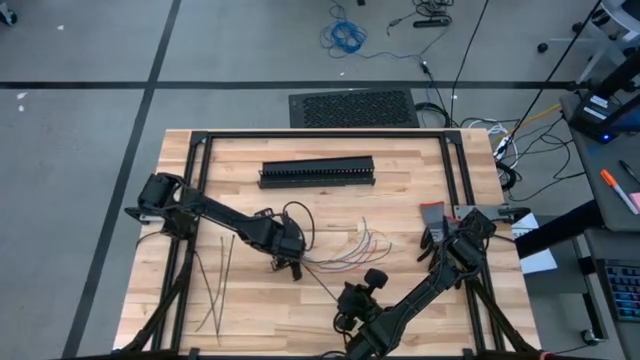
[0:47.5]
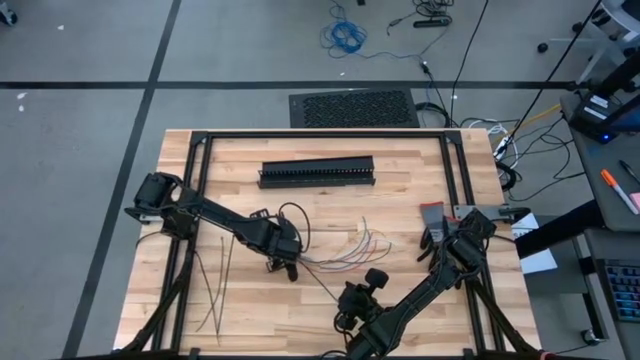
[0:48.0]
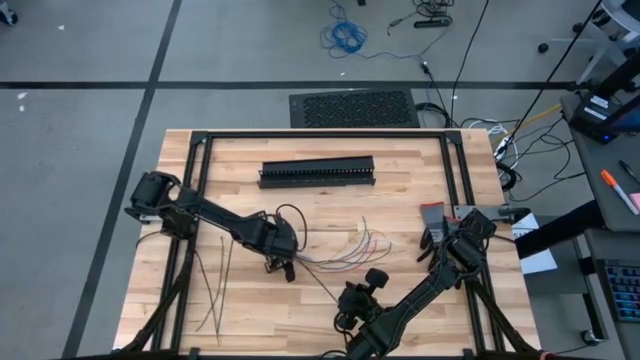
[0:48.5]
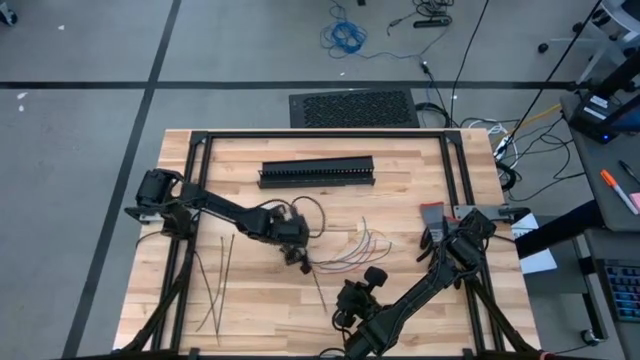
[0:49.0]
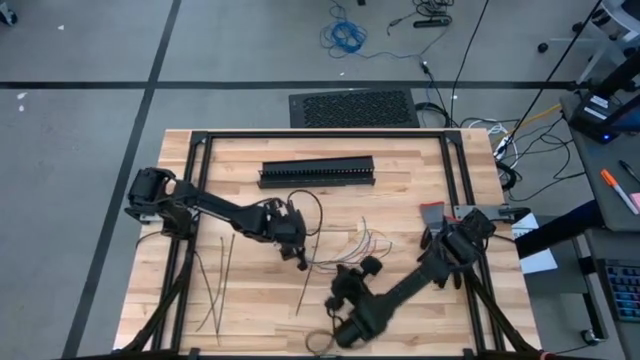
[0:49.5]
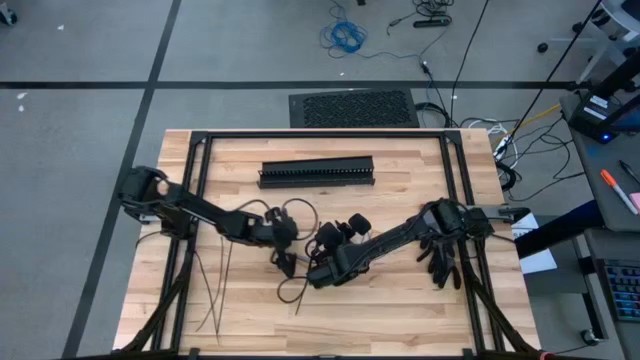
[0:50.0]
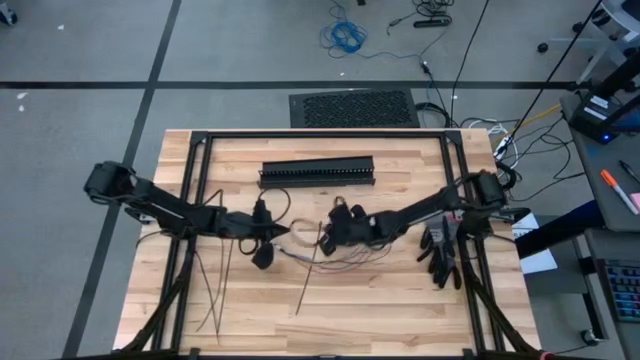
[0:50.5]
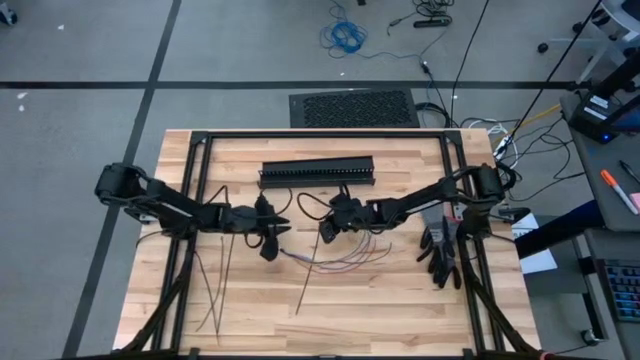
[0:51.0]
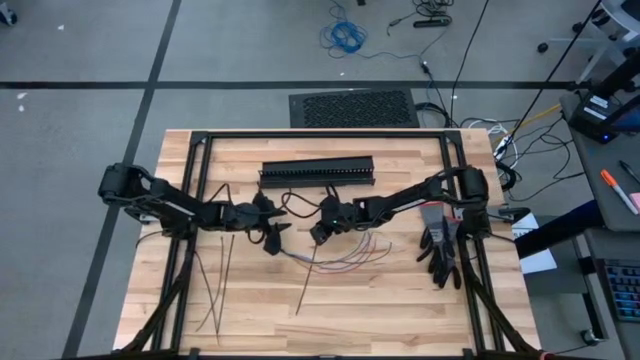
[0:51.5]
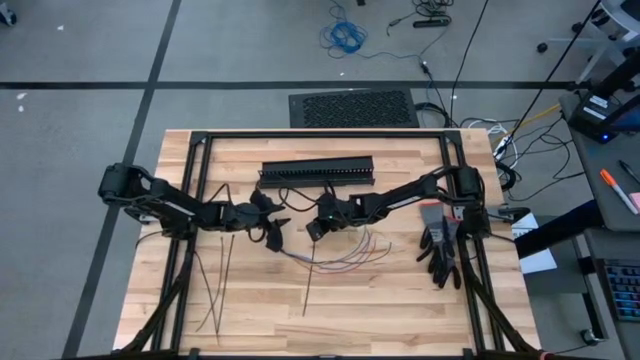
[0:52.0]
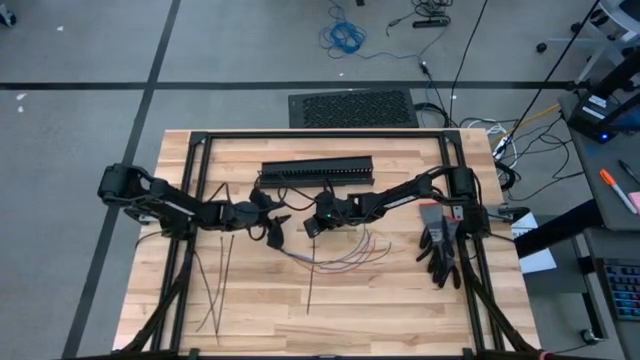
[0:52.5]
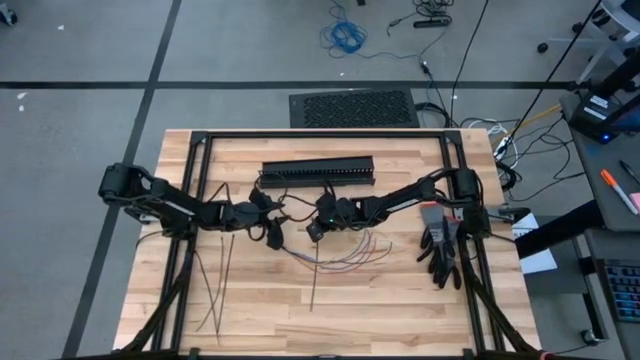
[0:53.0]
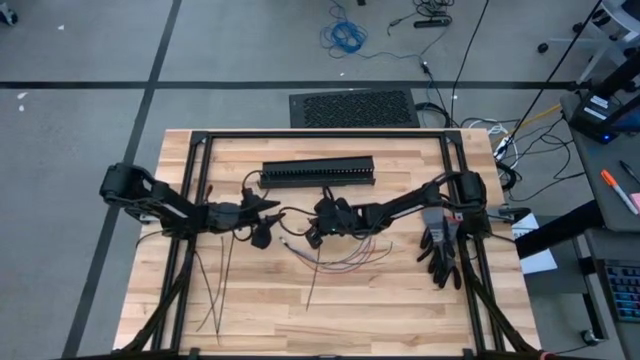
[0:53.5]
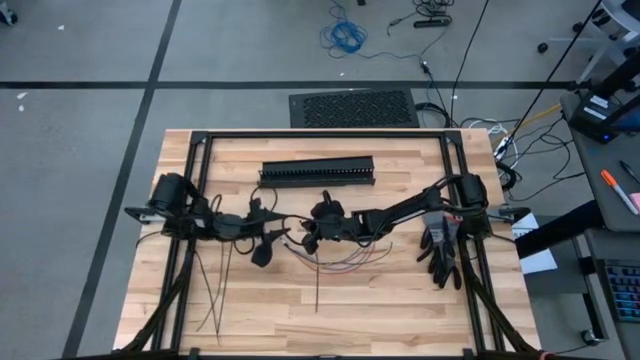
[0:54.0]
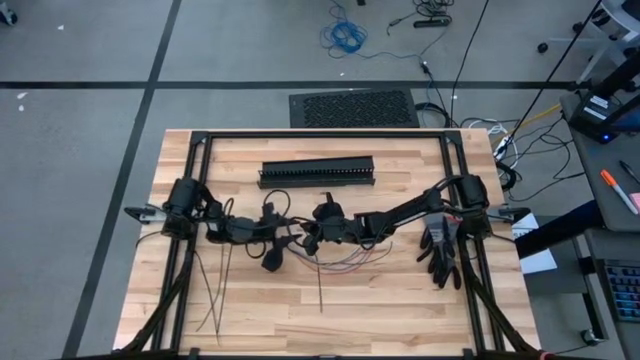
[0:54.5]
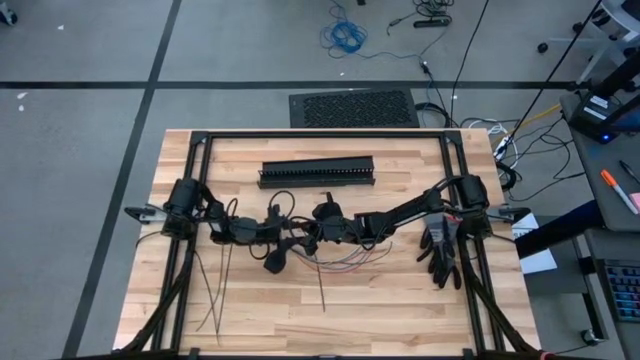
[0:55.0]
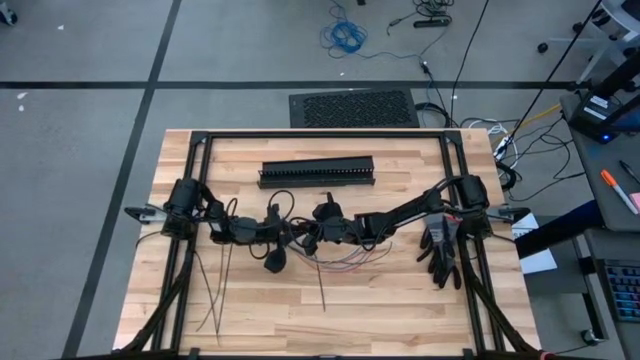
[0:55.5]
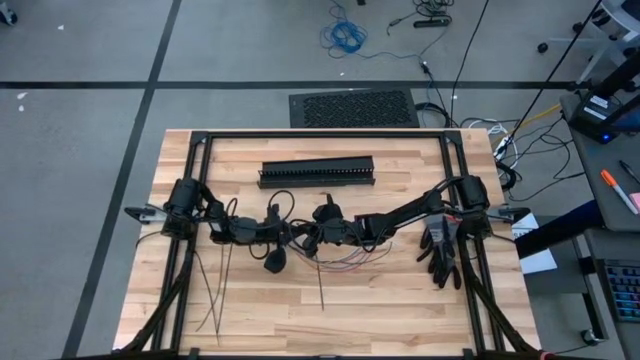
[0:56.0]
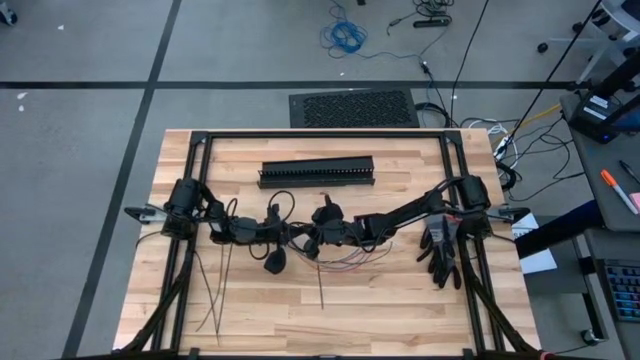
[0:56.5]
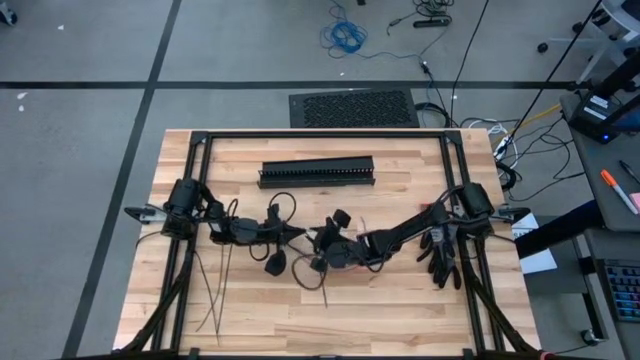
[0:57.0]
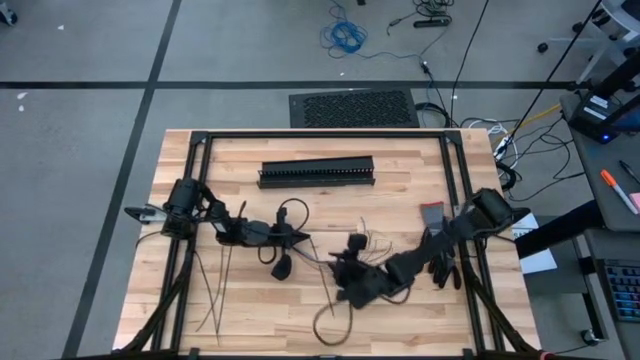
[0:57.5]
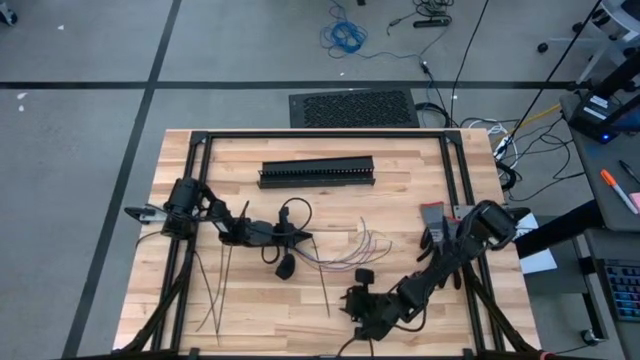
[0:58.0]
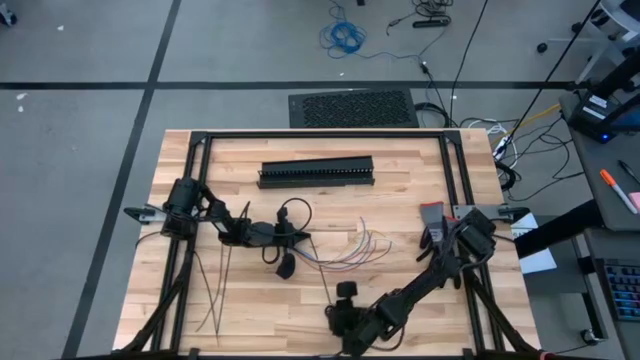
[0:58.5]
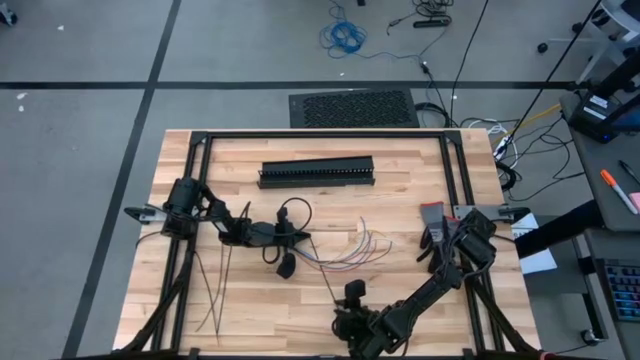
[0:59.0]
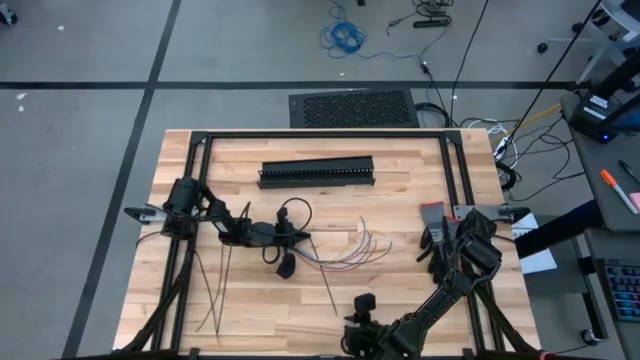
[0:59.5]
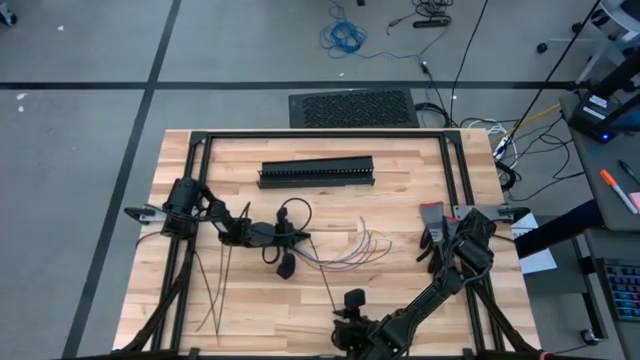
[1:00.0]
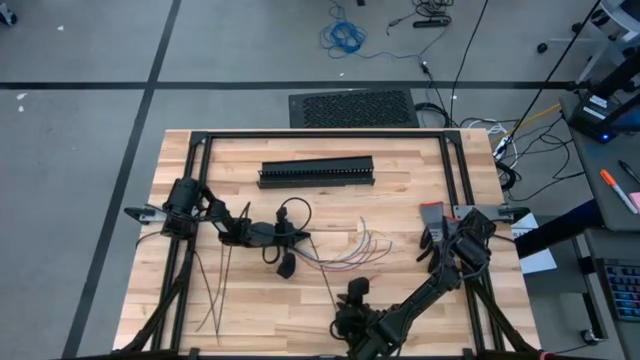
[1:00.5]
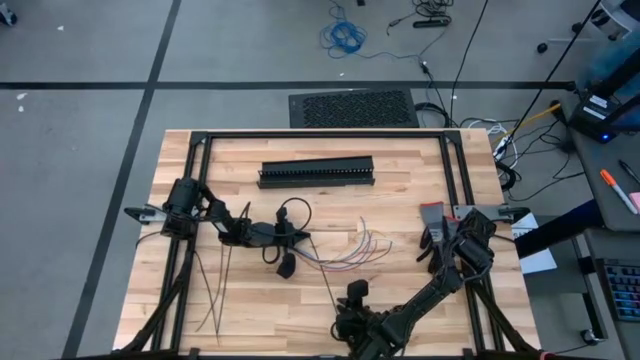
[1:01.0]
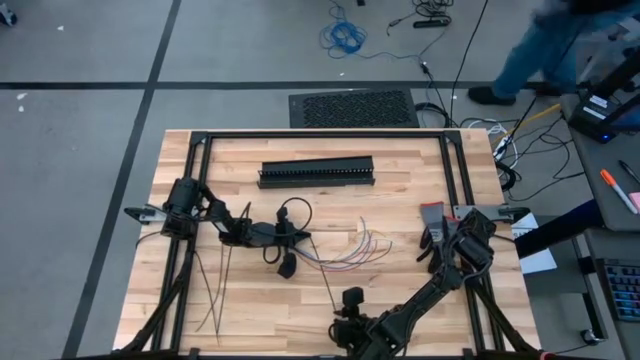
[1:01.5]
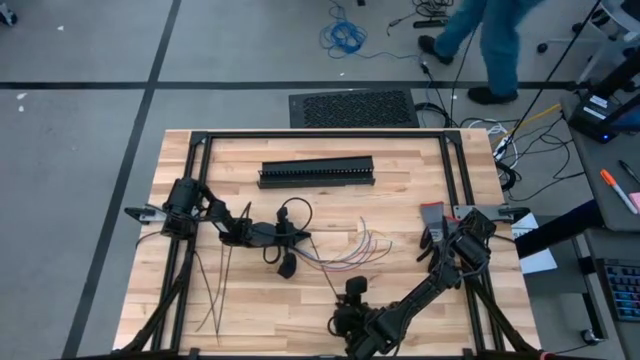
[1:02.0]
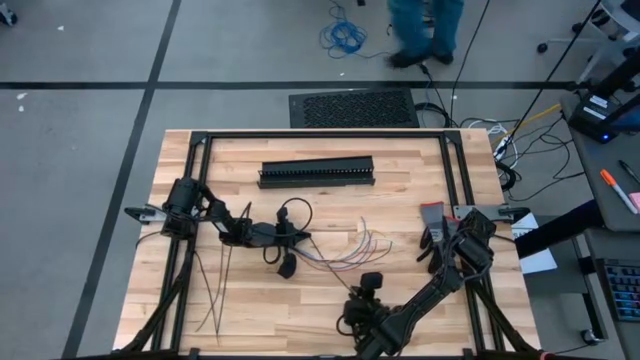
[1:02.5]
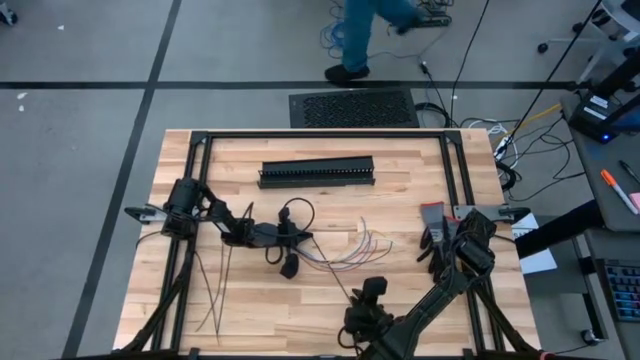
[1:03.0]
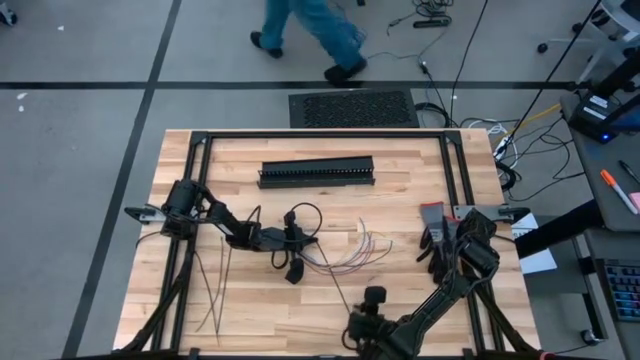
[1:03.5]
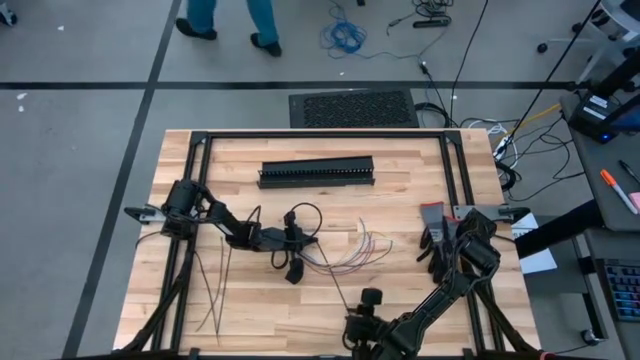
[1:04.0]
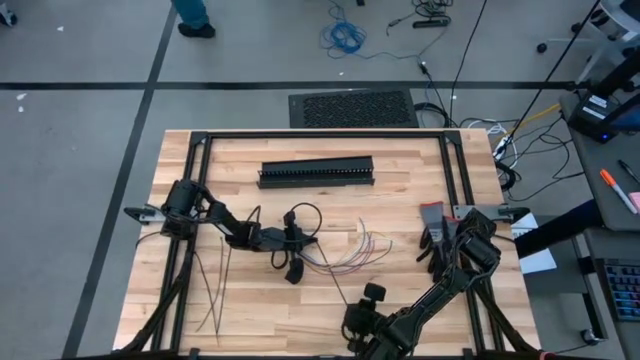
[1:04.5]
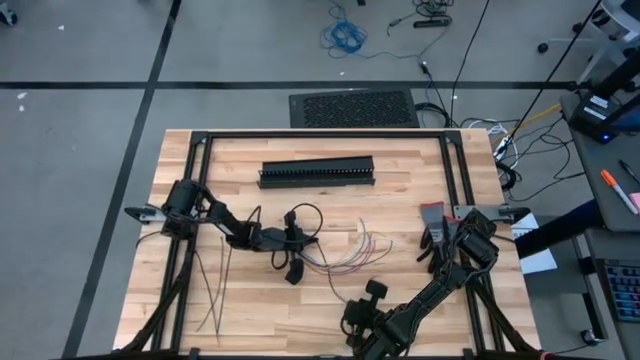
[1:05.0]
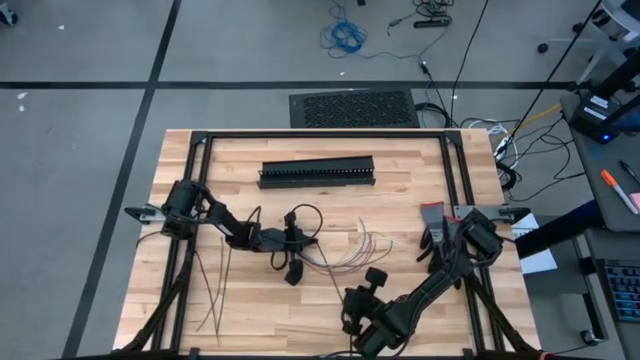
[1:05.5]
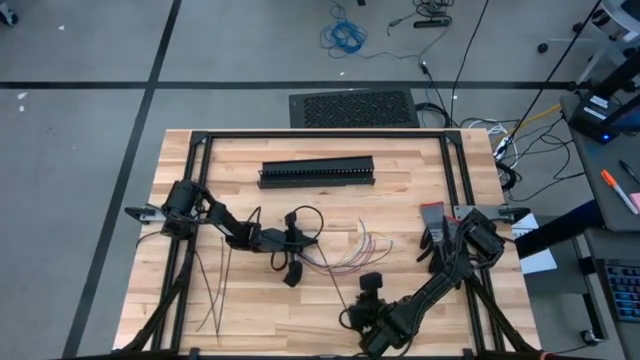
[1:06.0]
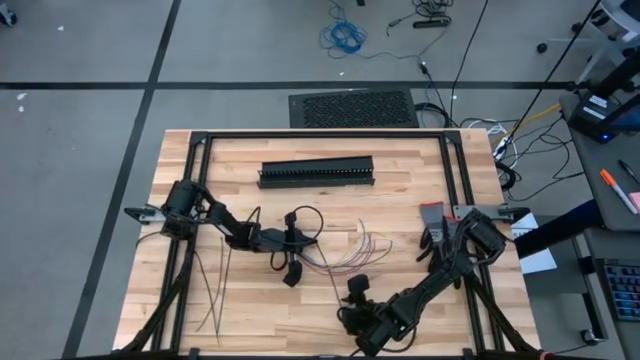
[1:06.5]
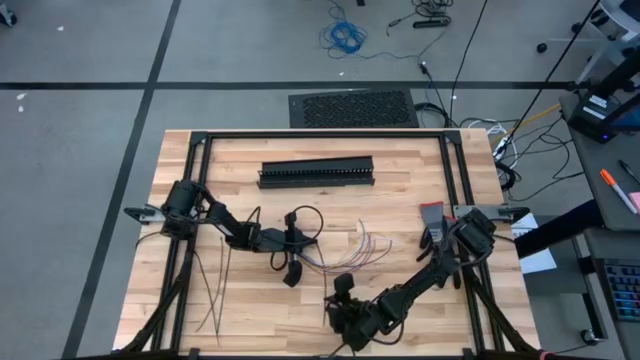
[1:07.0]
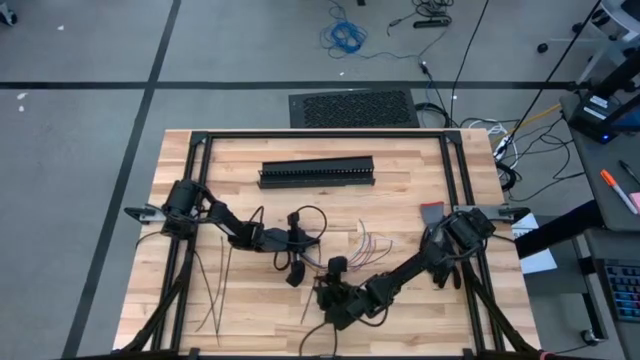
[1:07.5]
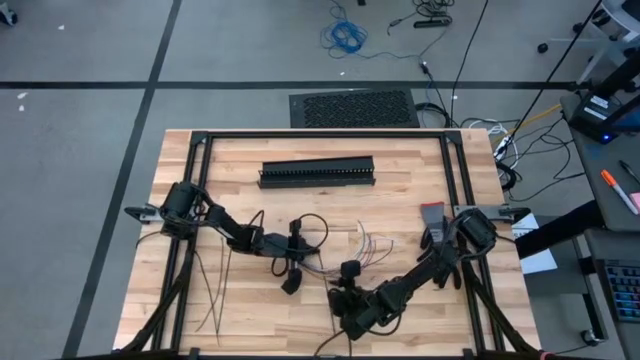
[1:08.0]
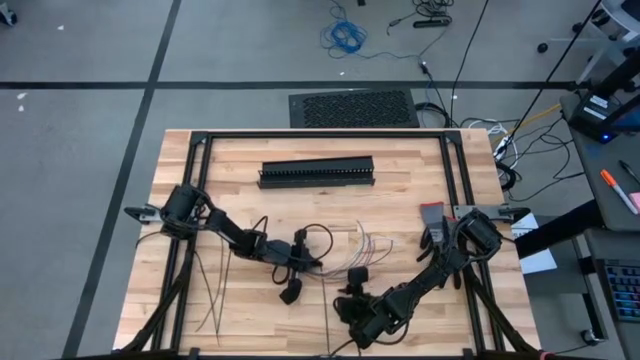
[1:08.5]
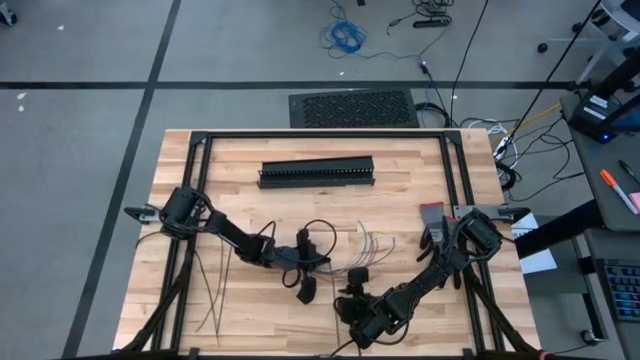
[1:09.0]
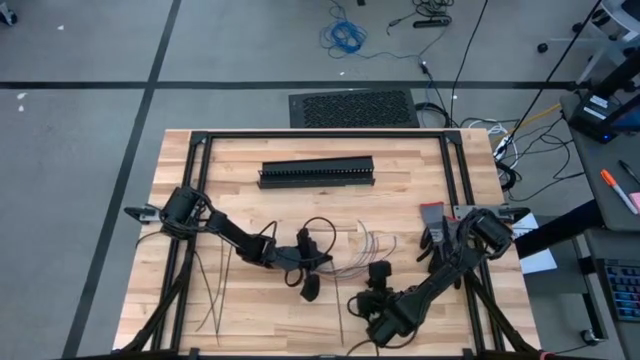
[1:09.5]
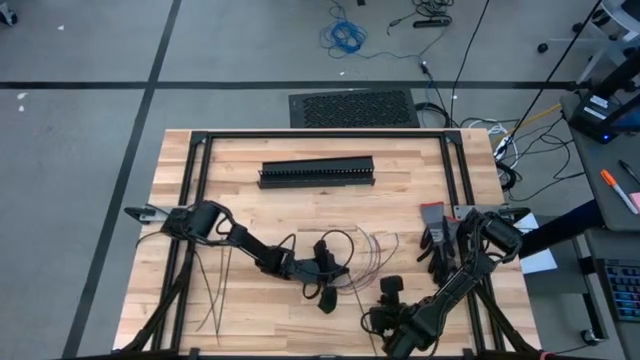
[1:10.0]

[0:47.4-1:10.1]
Task: Ziptie cables
Wrap the zip tie around the cable wires
